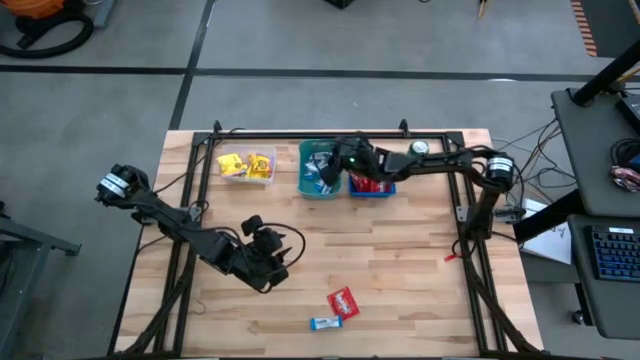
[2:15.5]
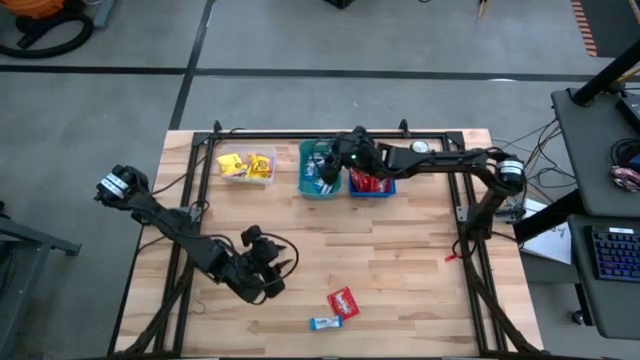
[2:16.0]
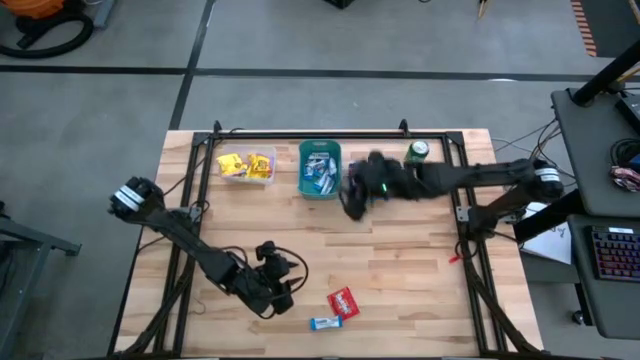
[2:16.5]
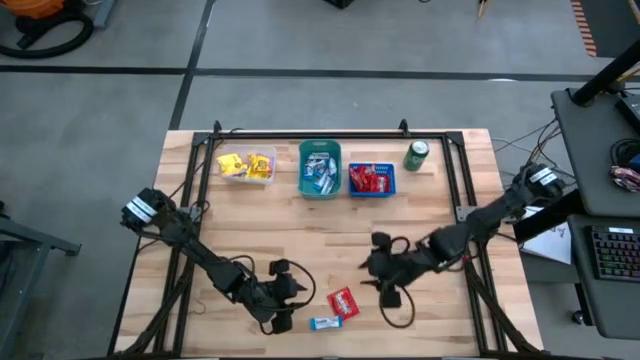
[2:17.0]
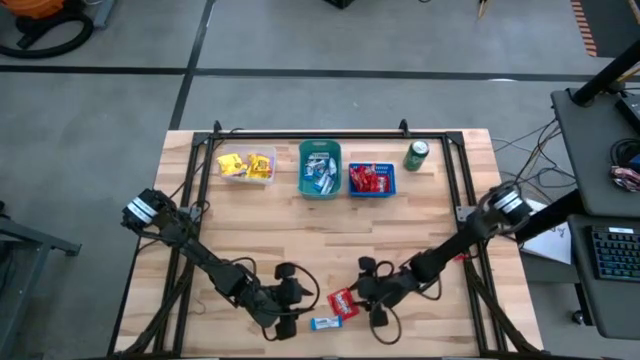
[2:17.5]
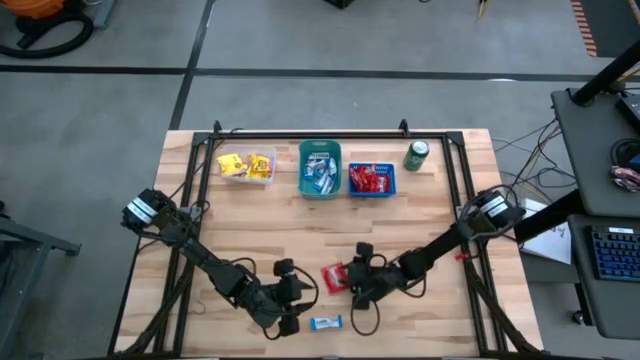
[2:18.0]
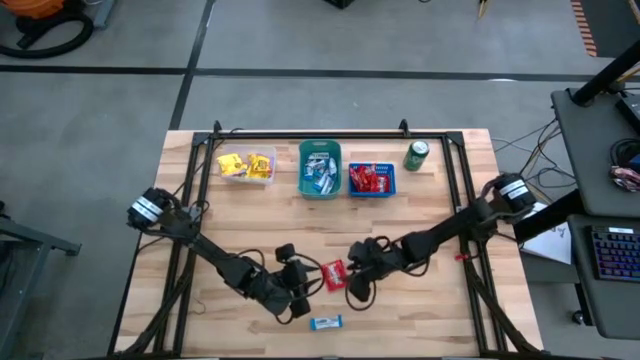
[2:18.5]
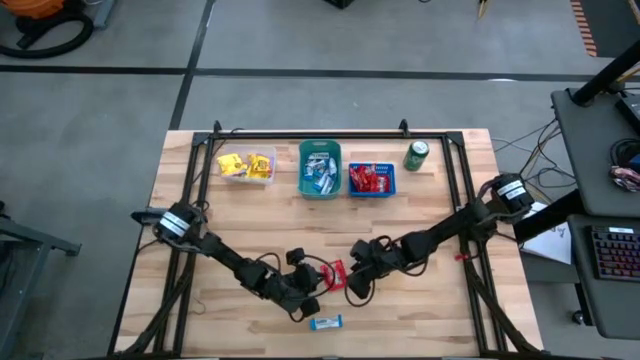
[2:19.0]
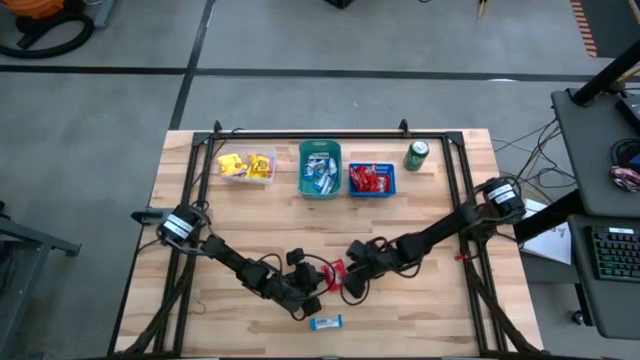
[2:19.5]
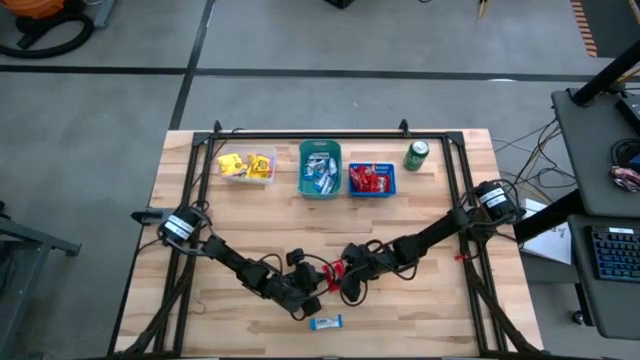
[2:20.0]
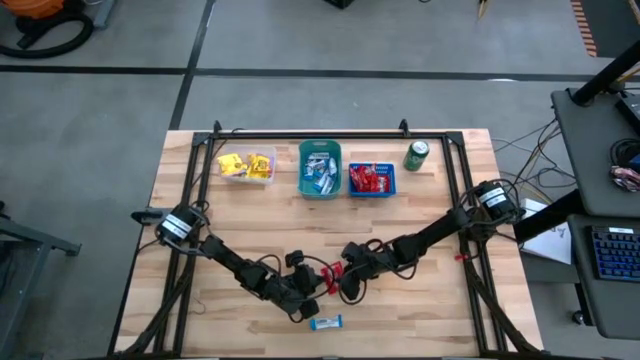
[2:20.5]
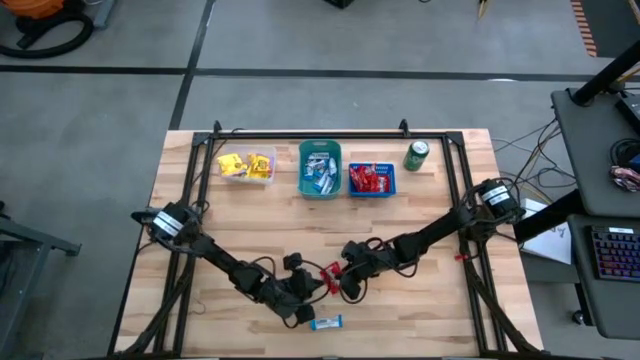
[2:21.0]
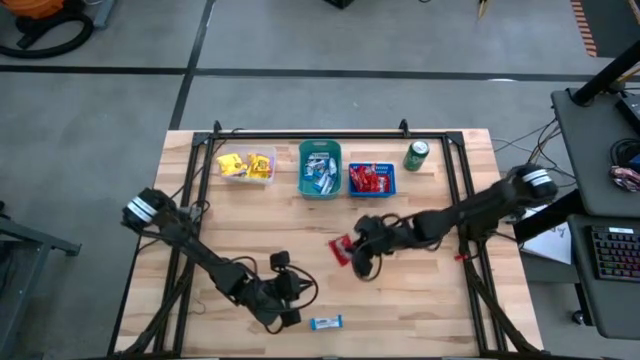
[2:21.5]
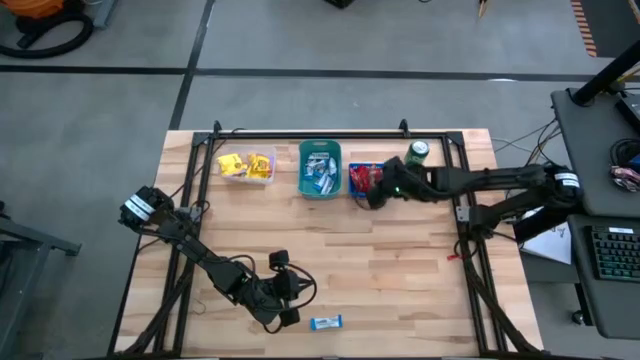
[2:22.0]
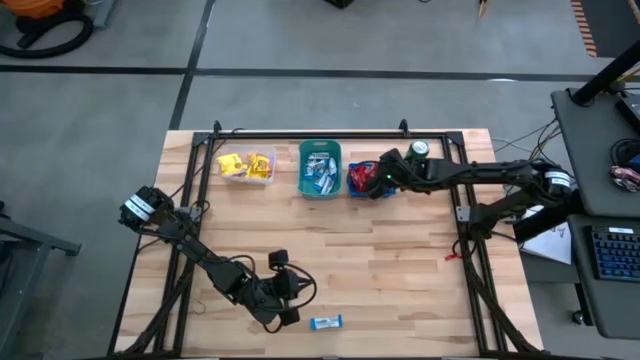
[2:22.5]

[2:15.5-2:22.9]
Task: Sort candy
Put the red candy into the blue bin

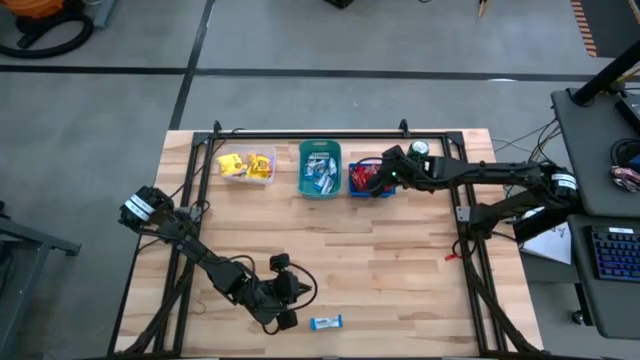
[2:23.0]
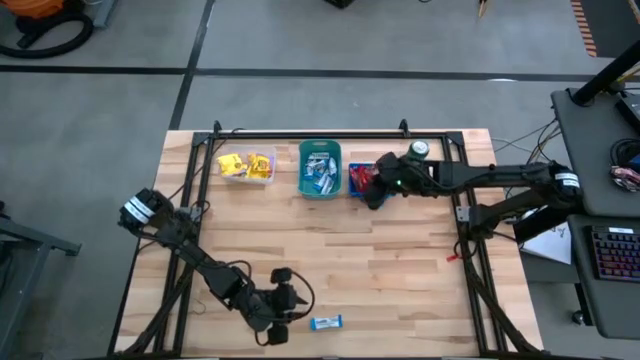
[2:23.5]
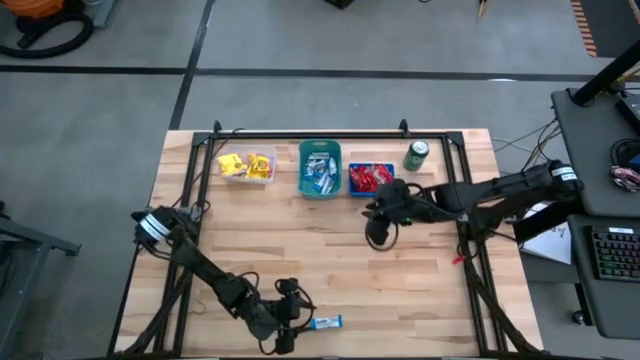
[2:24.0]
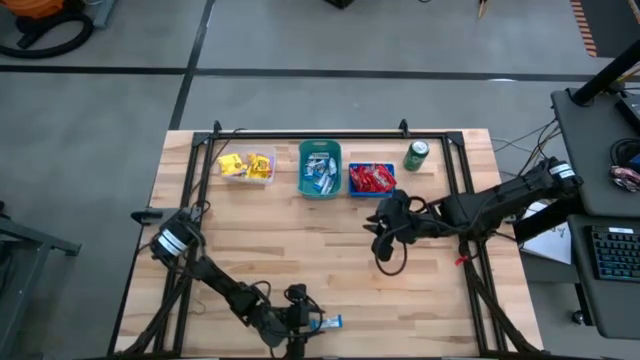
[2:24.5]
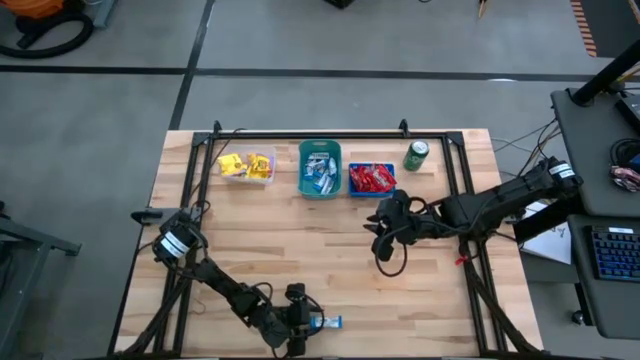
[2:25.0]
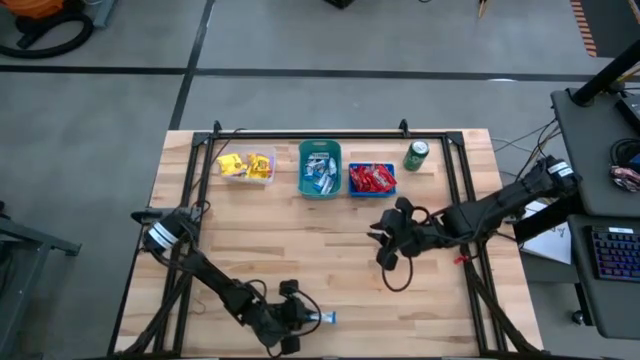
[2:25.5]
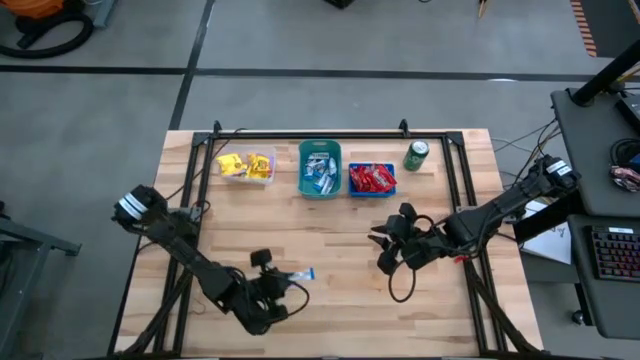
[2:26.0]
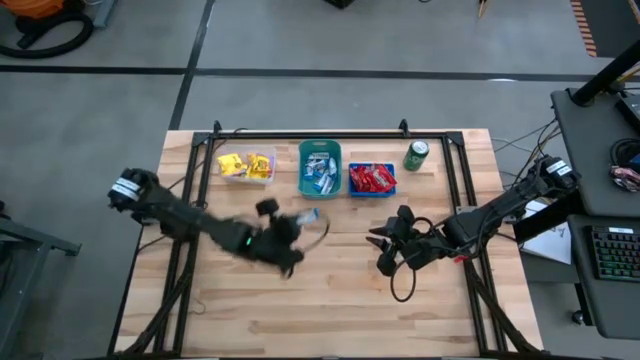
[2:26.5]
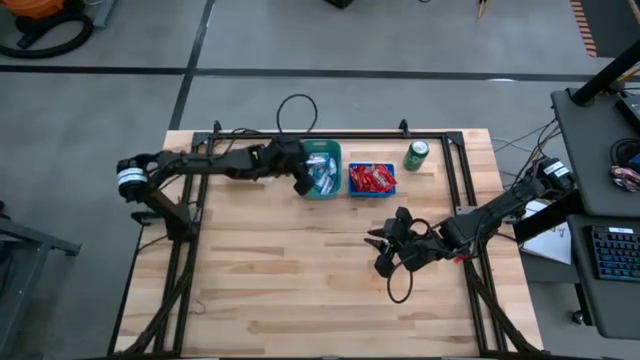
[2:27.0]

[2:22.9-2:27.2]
Put the white chocolate into the green bin

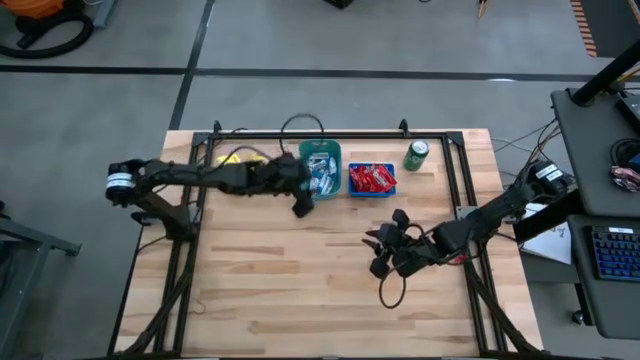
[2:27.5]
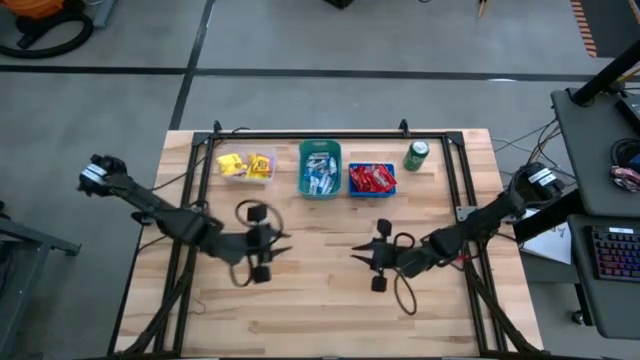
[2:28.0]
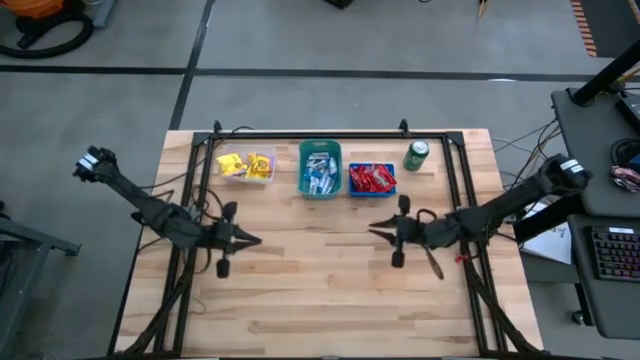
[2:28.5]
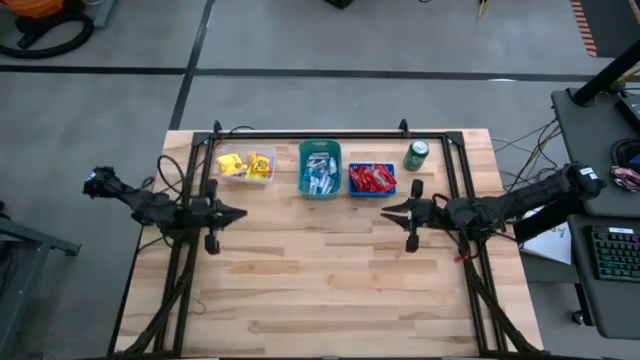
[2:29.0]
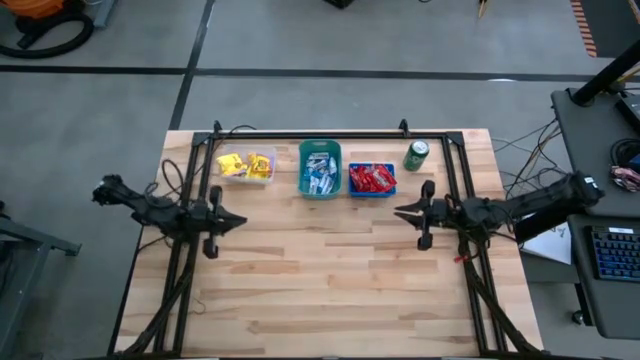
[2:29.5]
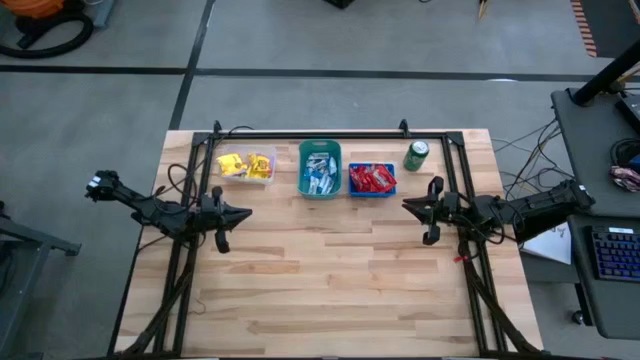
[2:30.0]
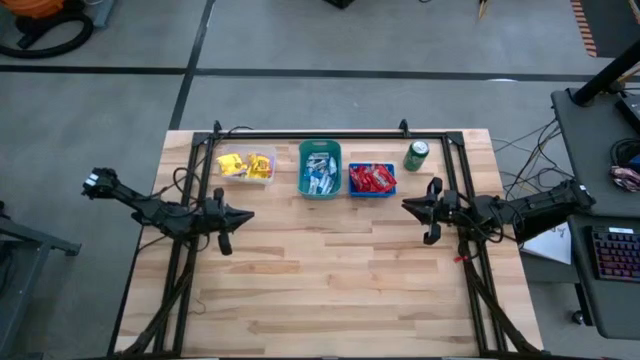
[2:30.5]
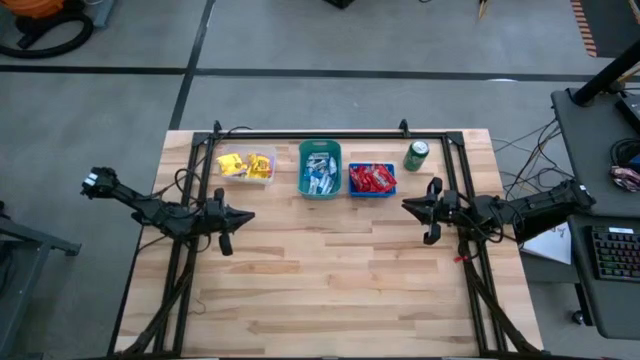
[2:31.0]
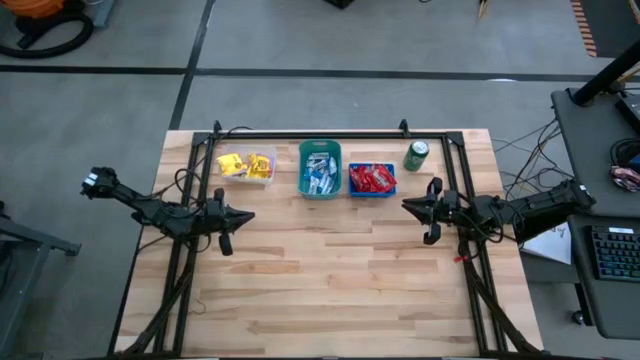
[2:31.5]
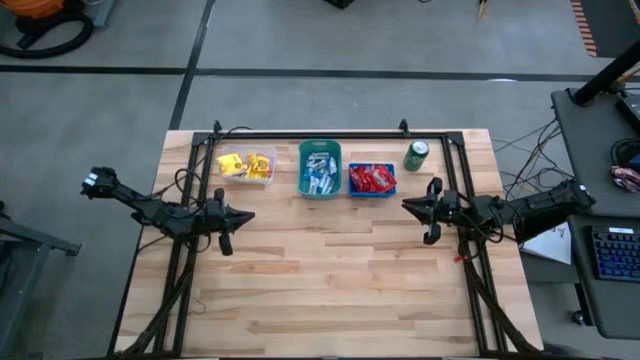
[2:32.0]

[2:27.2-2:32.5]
Return to Home Position

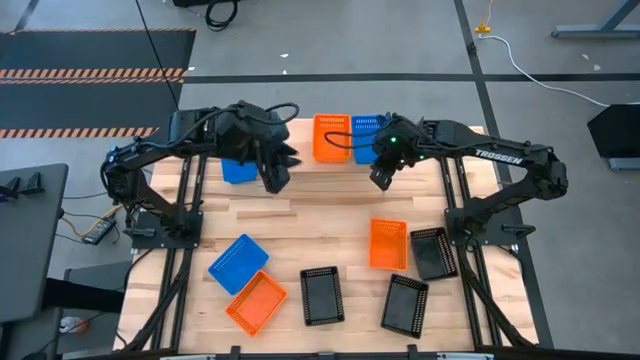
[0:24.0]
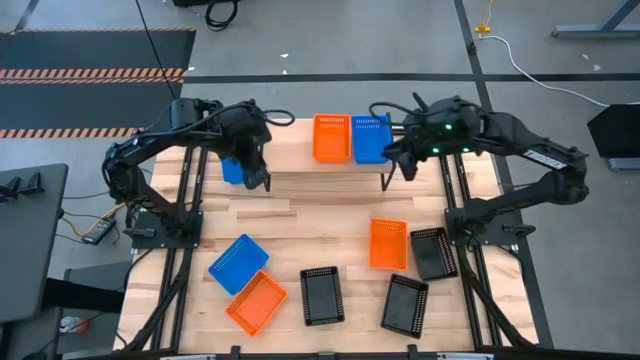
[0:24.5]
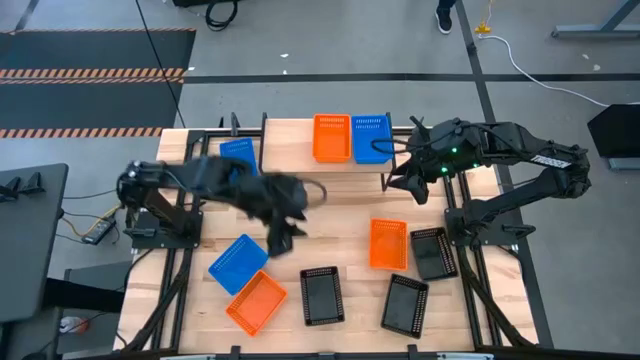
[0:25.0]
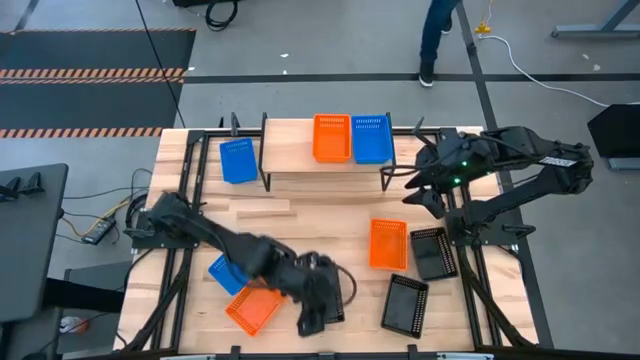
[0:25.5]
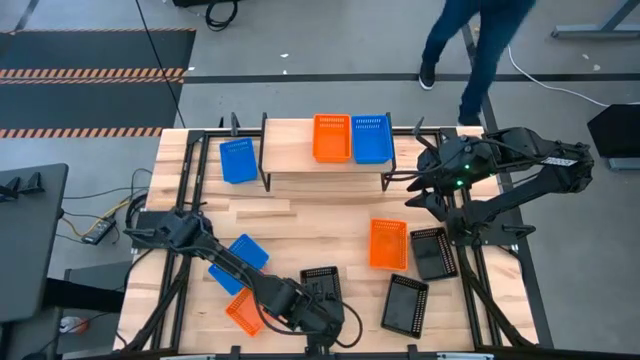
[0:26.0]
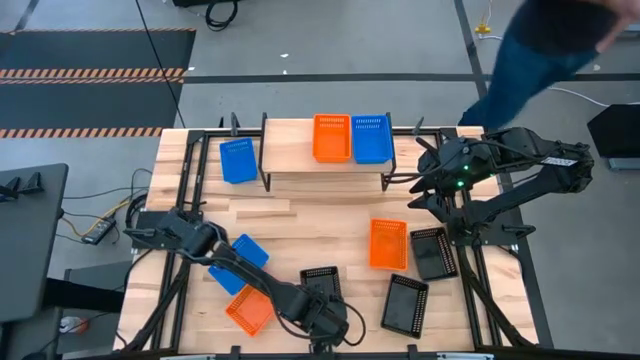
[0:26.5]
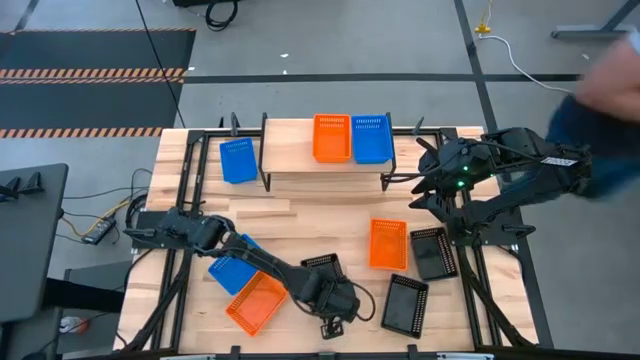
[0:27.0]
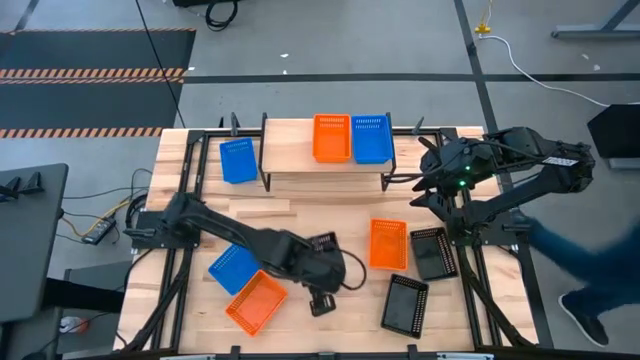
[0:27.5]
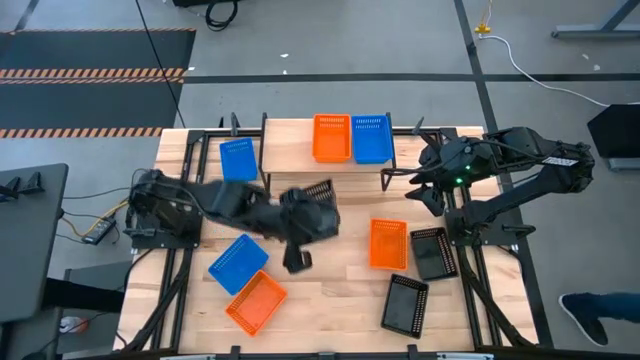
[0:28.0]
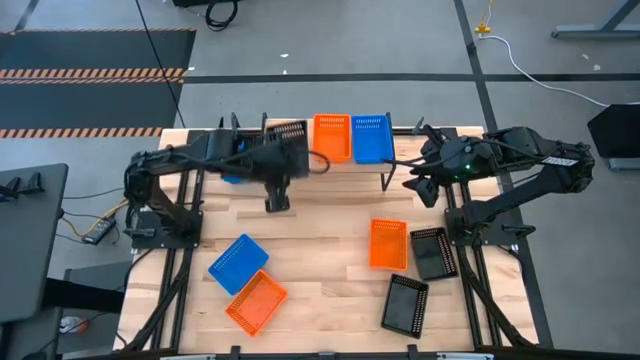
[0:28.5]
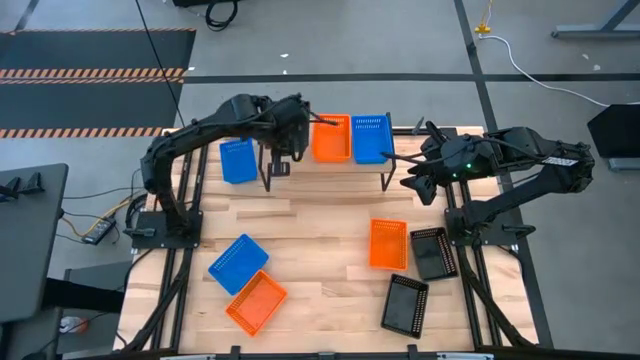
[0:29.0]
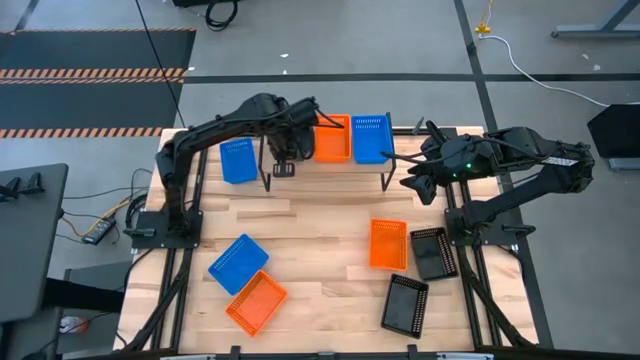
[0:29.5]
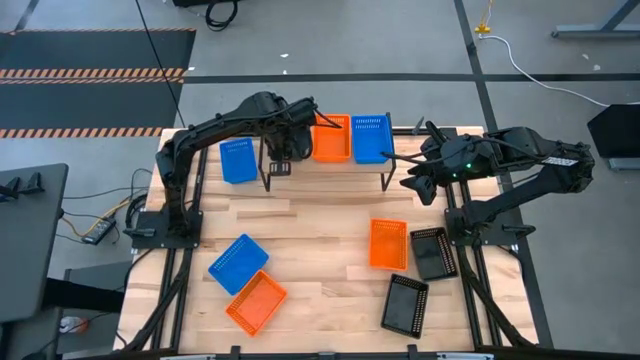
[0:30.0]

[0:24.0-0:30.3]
Task: Stack baskets on shelf by color
Put the bottom left black bin on the shelf
